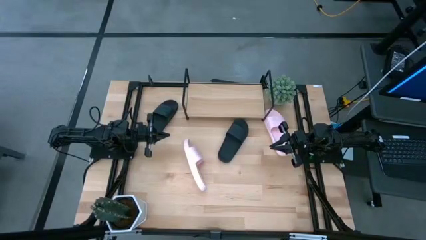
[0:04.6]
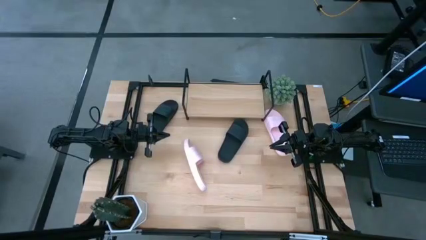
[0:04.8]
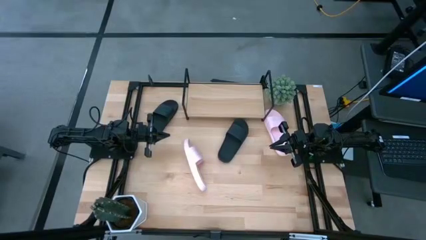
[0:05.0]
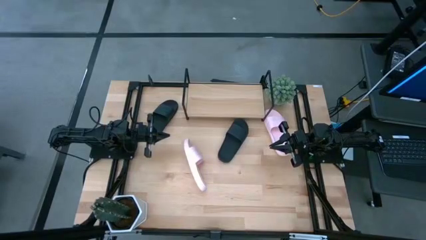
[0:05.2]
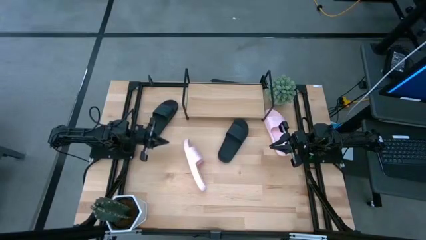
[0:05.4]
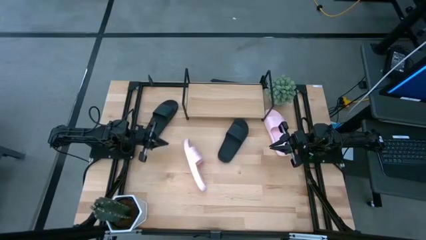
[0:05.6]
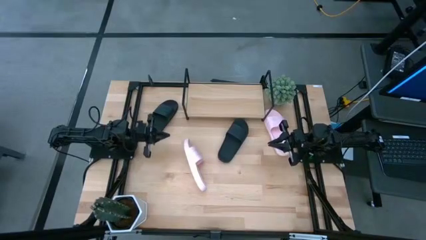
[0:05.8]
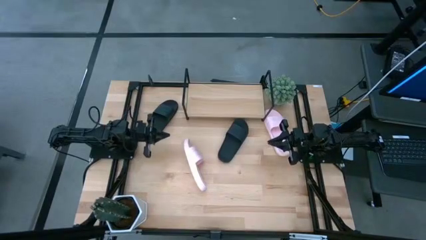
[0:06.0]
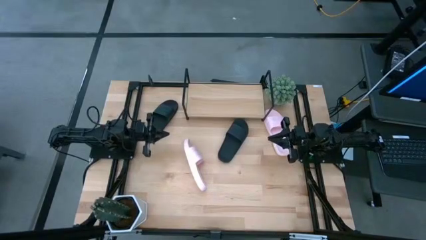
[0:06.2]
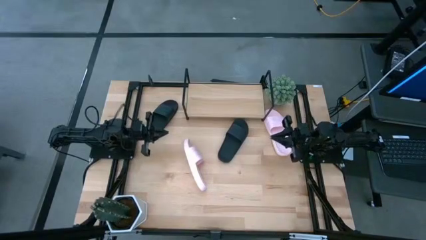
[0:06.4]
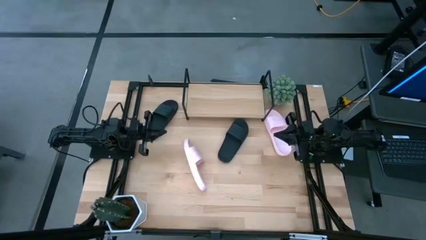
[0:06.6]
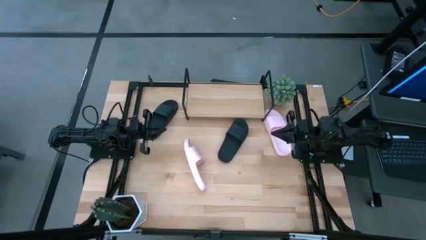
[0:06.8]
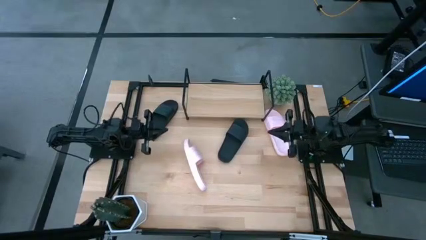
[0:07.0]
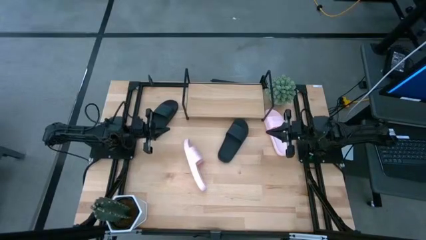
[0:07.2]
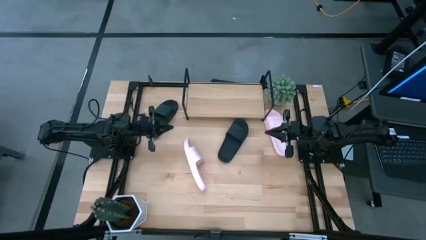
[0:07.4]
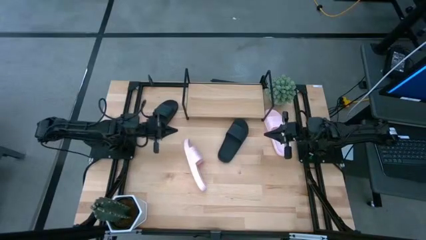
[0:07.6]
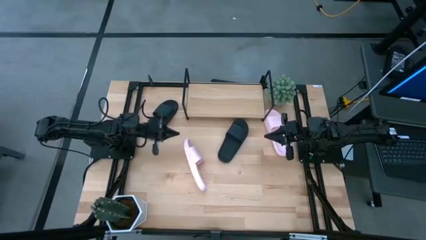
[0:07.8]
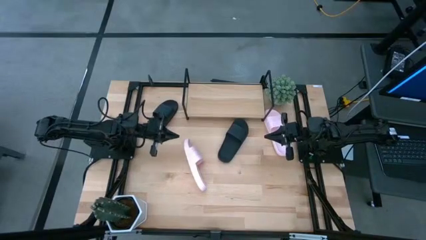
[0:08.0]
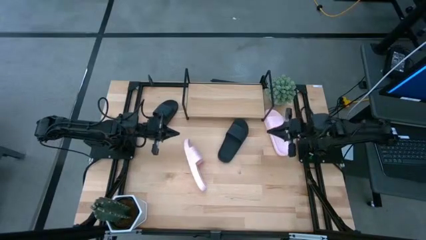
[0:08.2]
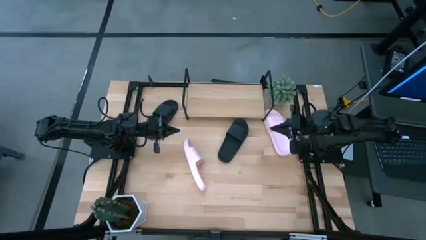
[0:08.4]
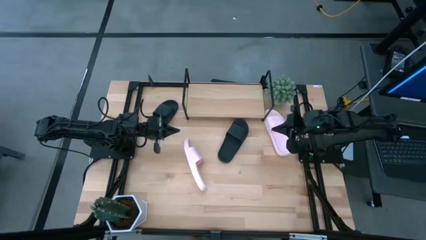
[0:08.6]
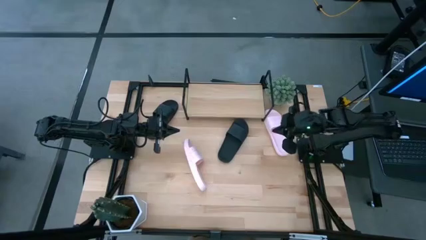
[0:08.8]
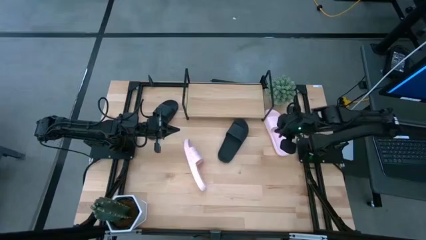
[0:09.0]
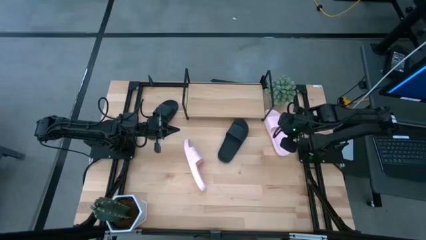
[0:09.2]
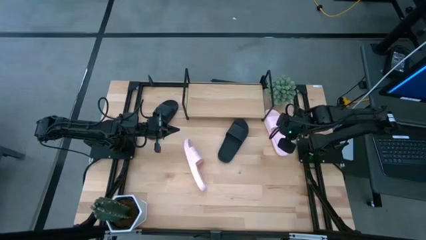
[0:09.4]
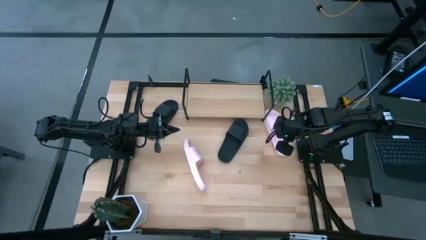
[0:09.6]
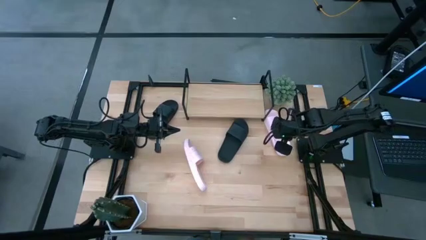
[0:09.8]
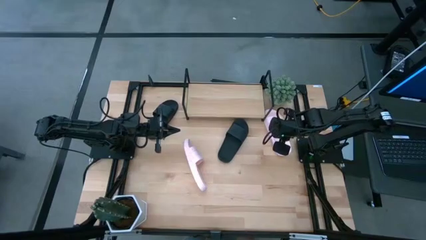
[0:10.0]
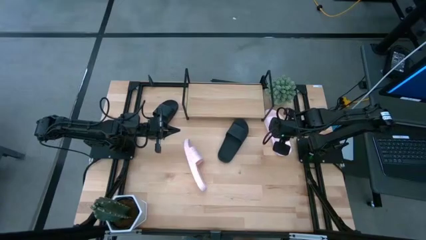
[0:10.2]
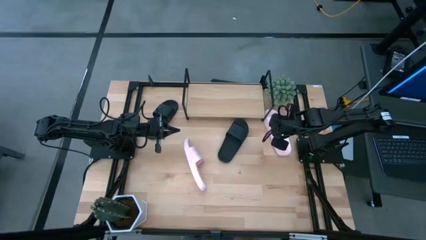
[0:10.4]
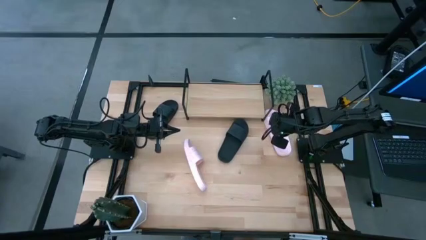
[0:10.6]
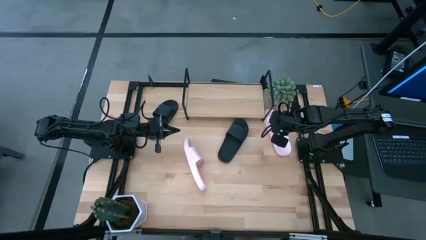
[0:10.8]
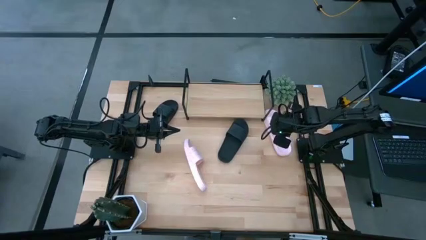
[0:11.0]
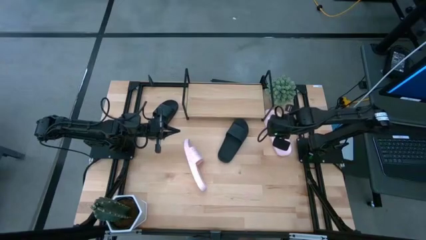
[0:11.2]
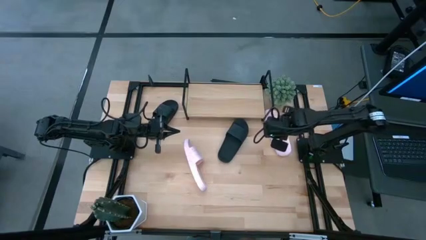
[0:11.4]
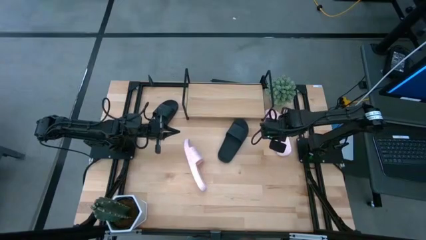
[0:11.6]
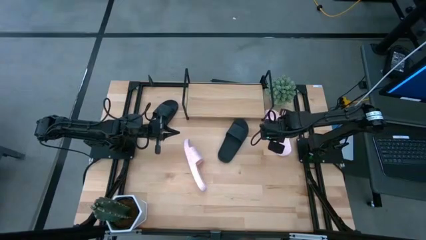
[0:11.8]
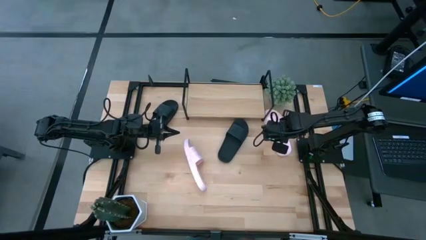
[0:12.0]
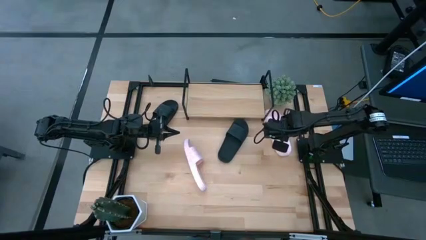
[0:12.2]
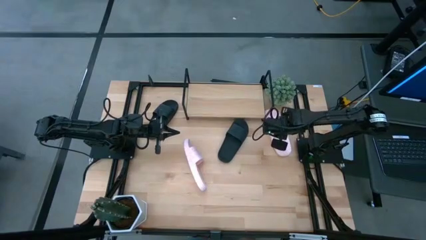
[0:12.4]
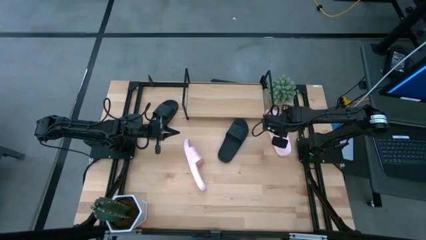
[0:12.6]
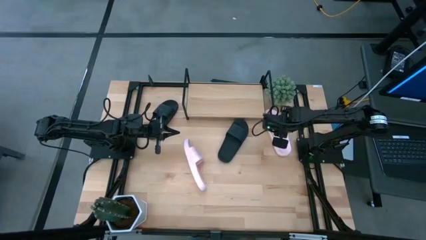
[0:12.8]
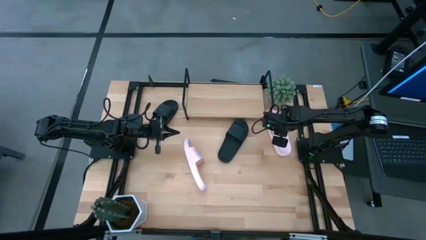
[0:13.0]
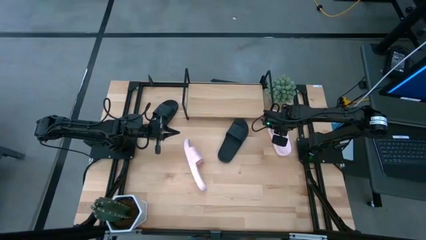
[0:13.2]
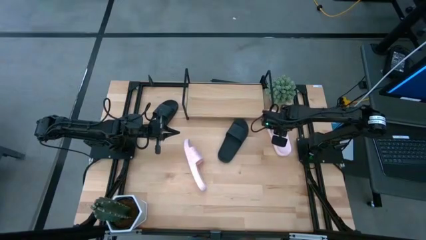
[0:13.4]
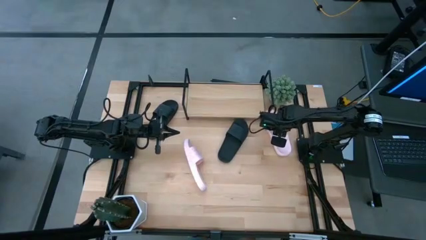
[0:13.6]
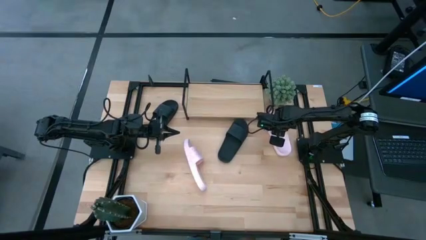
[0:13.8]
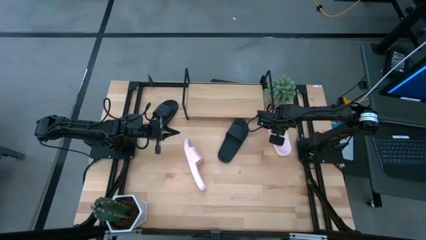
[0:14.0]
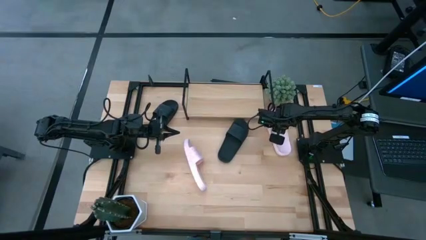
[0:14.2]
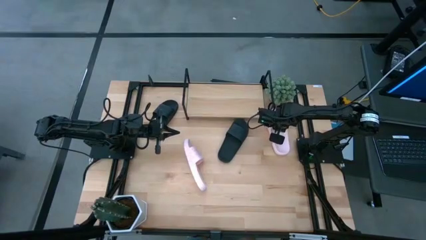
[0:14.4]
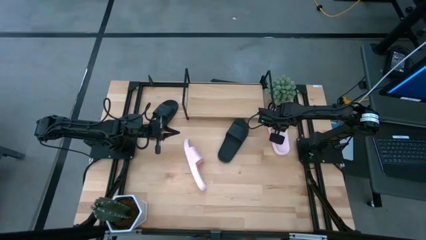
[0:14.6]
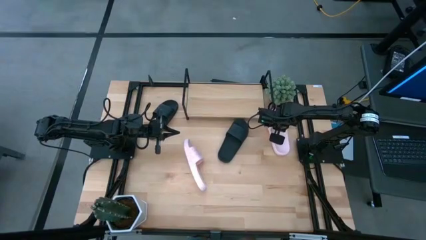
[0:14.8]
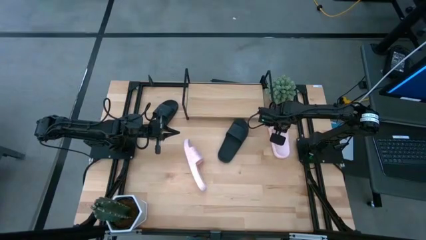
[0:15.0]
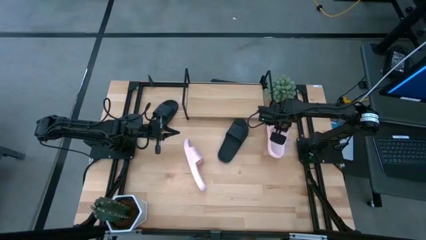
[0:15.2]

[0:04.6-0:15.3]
Task: Pick and place slides into the shelf
Put the right pink slipper on the shelf

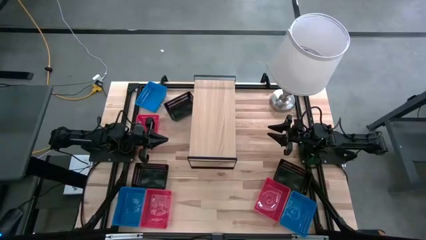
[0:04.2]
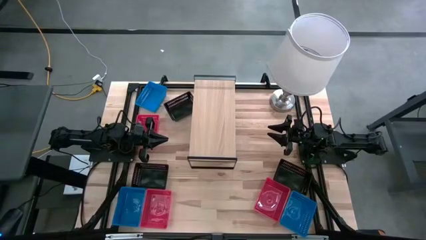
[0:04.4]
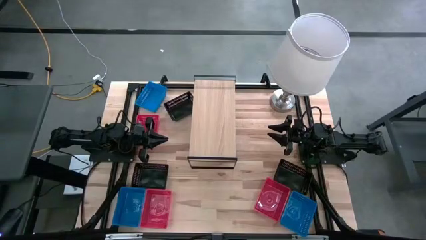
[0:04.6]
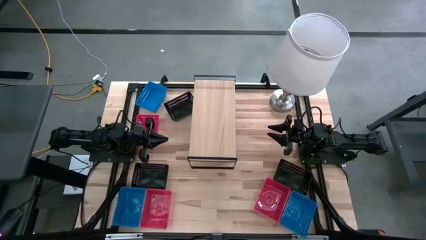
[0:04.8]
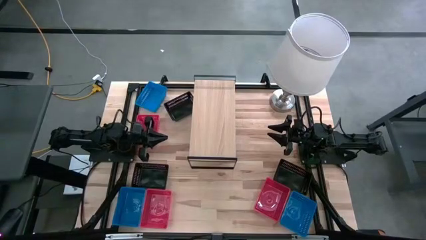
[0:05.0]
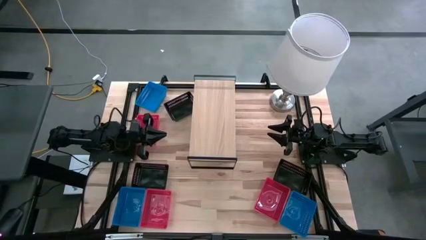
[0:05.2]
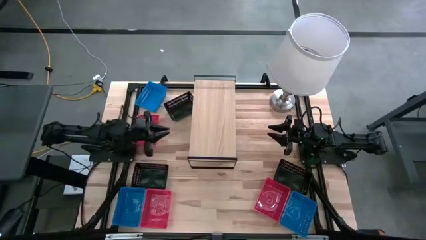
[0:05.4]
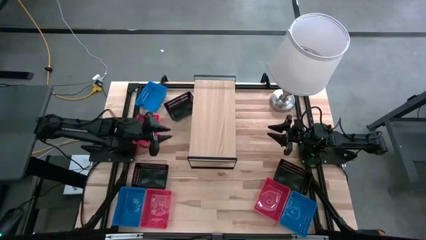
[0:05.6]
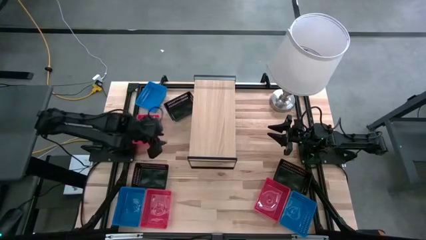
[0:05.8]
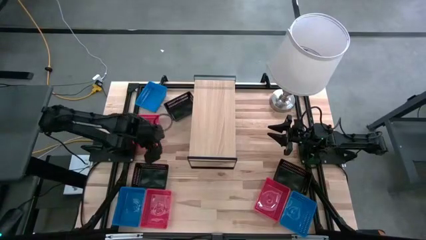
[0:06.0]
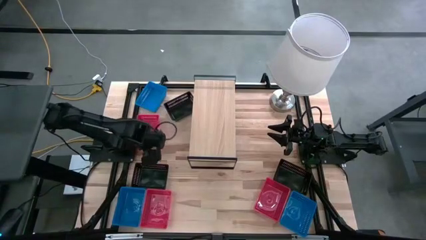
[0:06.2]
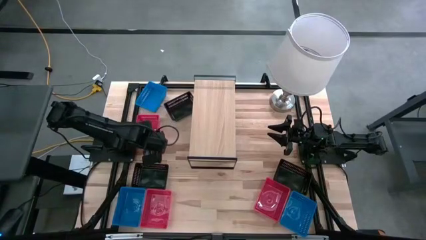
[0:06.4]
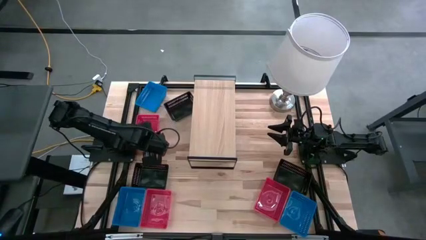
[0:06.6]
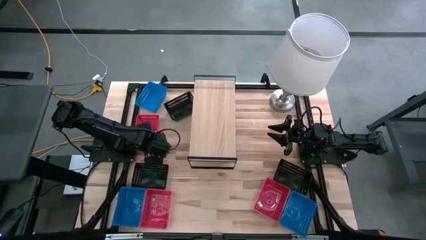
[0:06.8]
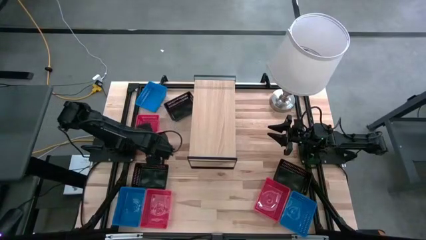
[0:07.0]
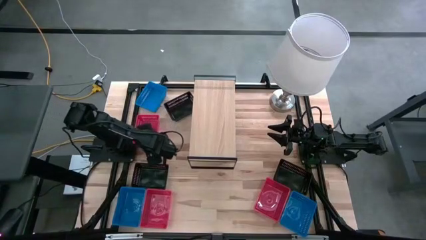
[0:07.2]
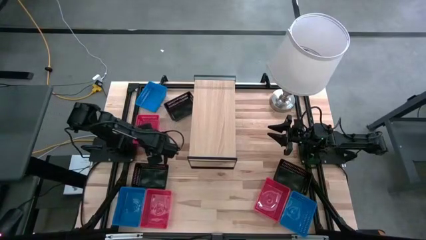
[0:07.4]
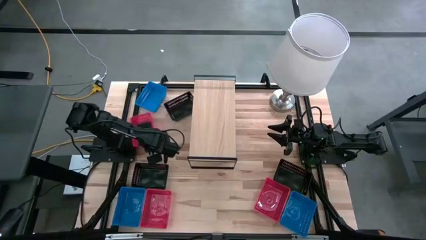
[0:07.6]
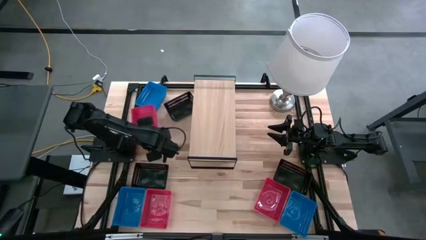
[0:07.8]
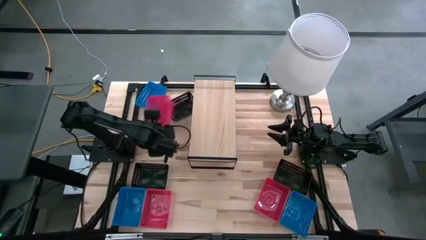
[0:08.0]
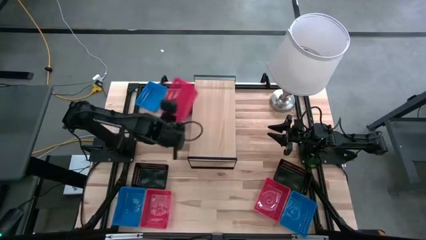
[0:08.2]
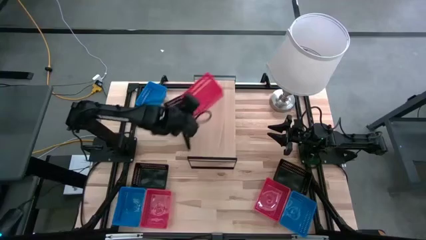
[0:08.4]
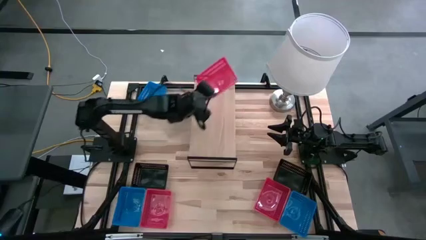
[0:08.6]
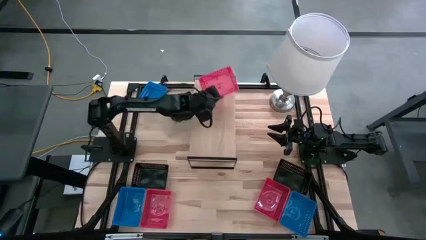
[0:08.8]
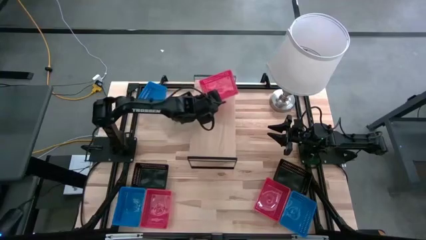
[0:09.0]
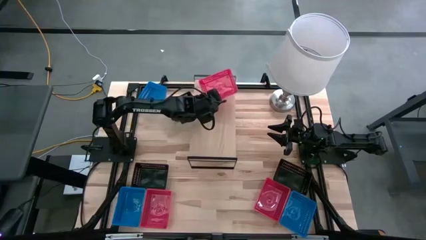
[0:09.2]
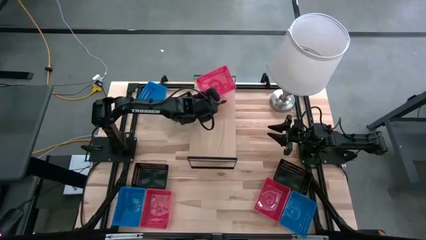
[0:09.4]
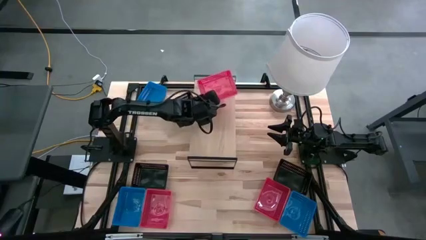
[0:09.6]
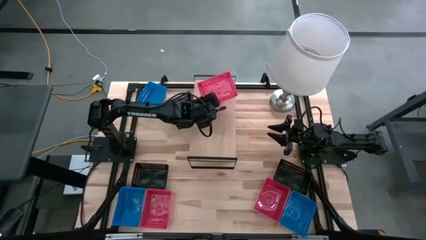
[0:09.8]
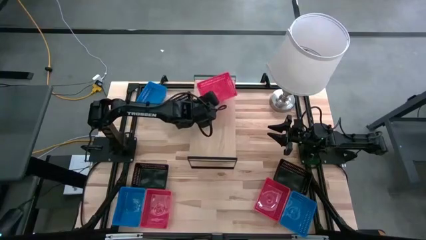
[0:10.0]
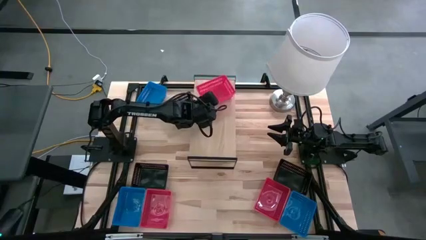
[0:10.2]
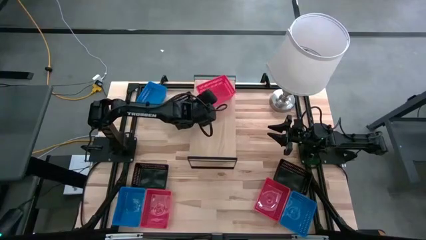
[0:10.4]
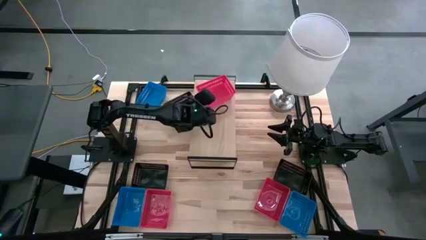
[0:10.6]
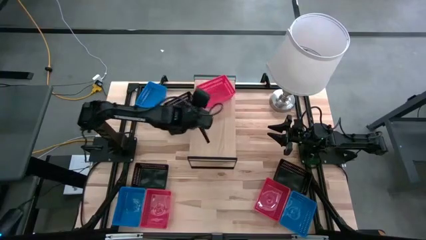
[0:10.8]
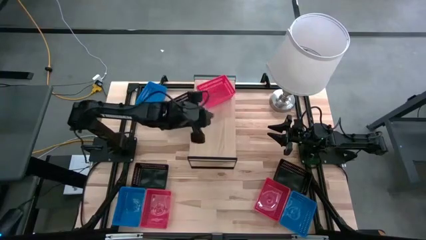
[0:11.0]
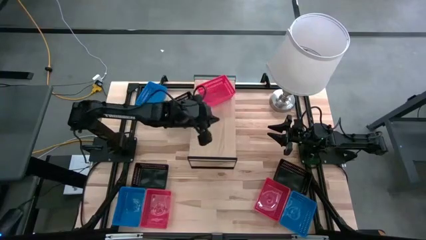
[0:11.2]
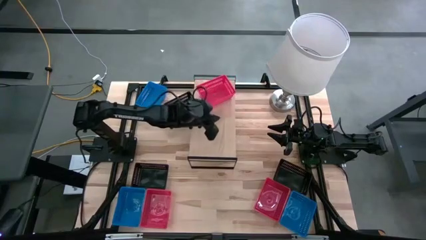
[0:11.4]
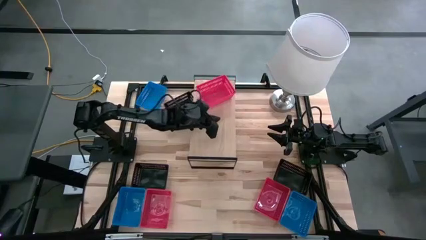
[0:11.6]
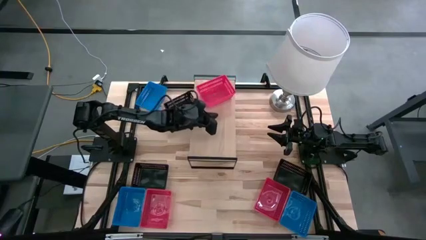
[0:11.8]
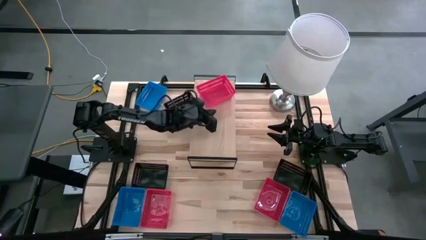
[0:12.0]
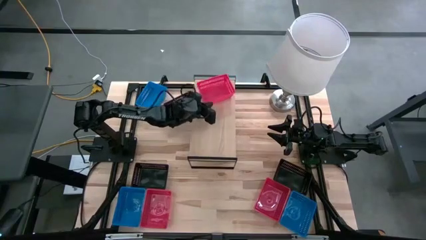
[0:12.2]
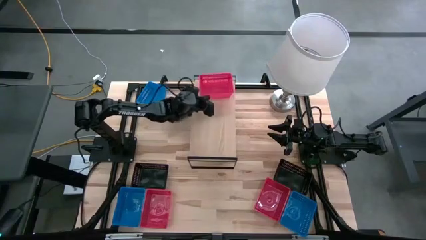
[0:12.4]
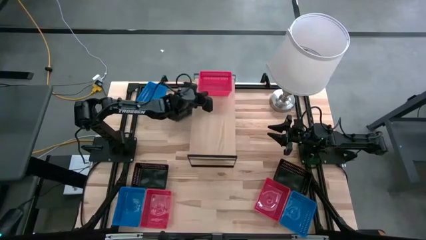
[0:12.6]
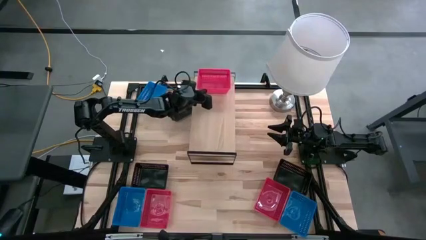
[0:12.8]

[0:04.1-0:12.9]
Task: Stack baskets on shelf by color
Put the top red bin on the shelf
